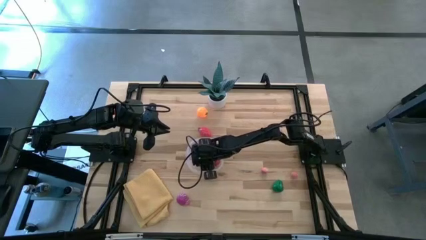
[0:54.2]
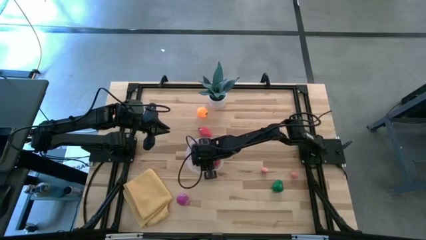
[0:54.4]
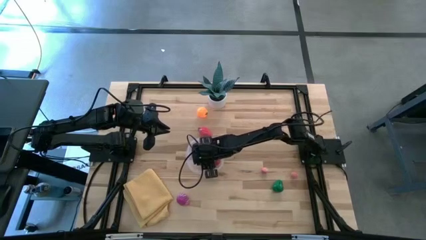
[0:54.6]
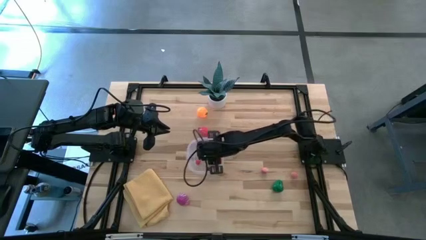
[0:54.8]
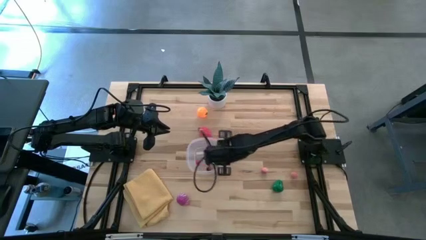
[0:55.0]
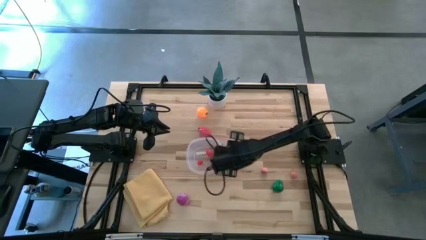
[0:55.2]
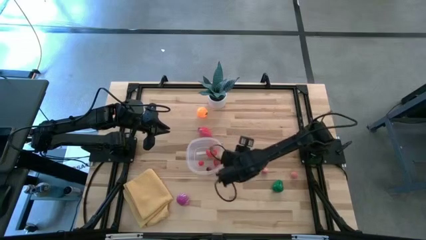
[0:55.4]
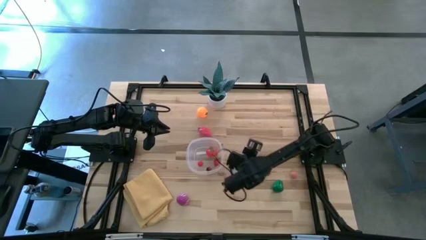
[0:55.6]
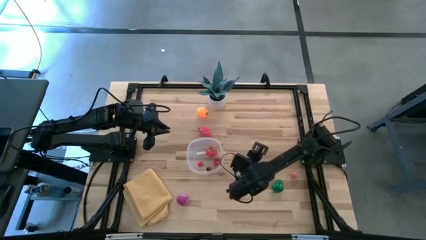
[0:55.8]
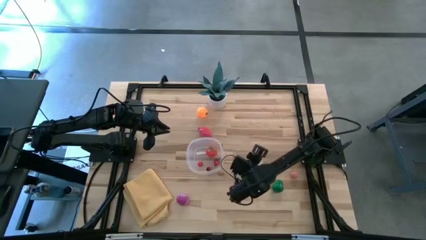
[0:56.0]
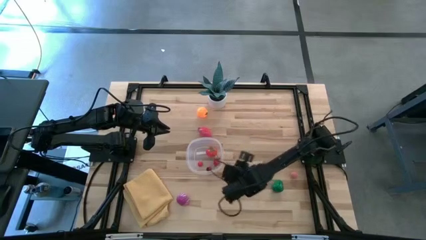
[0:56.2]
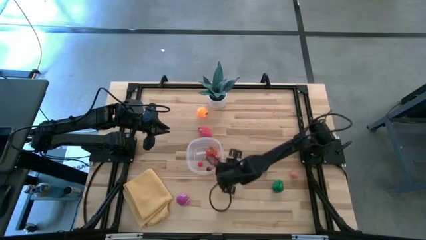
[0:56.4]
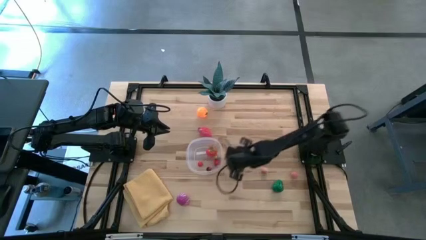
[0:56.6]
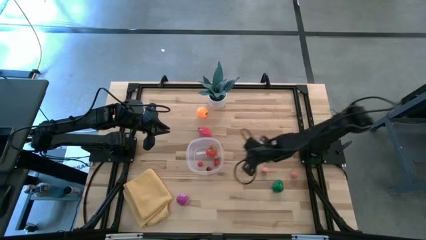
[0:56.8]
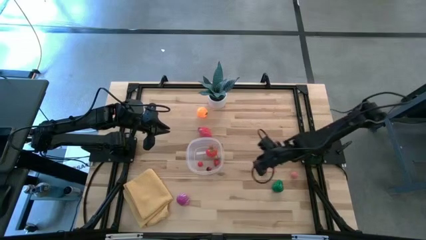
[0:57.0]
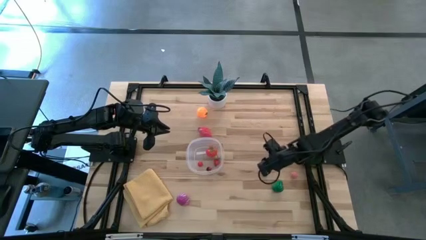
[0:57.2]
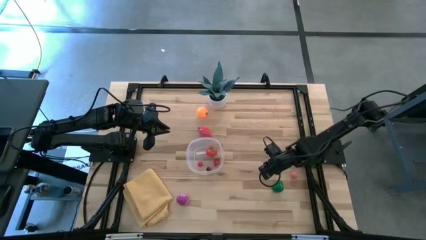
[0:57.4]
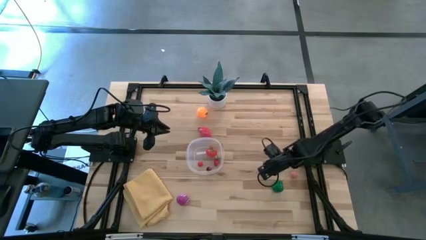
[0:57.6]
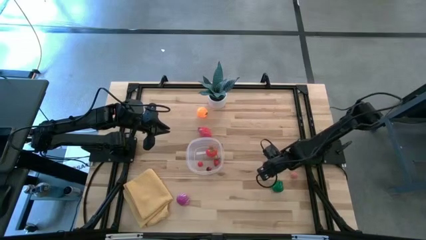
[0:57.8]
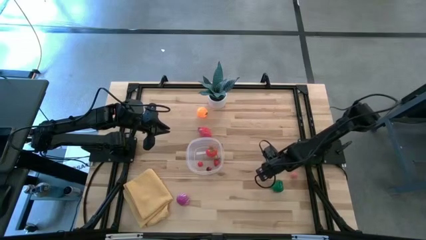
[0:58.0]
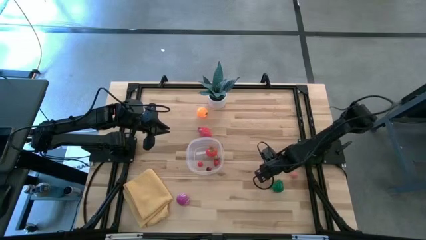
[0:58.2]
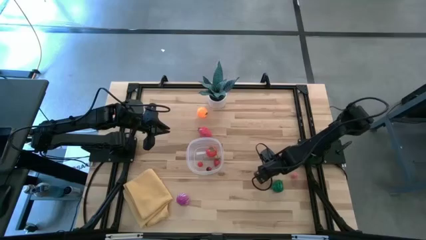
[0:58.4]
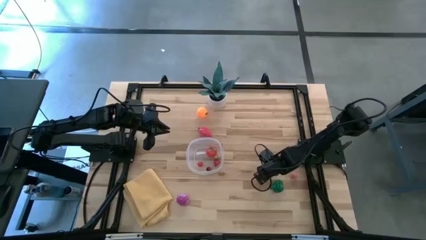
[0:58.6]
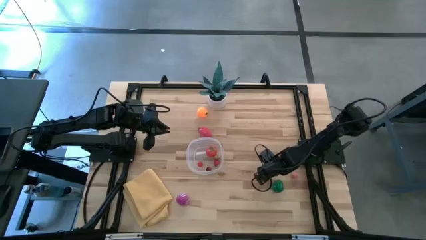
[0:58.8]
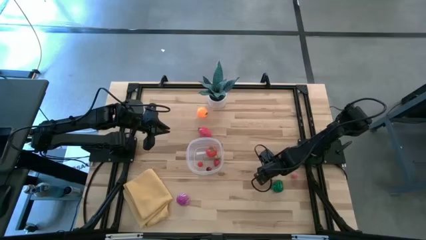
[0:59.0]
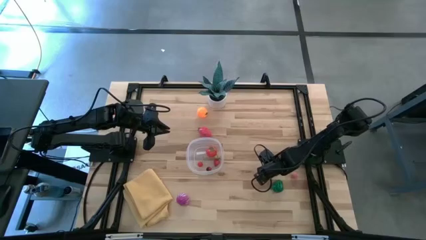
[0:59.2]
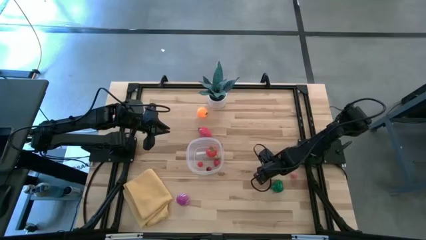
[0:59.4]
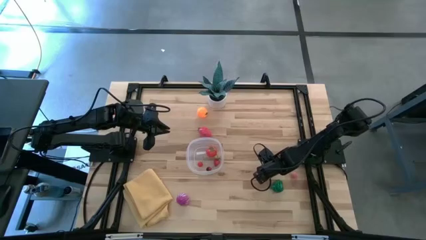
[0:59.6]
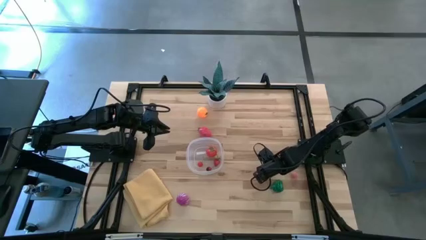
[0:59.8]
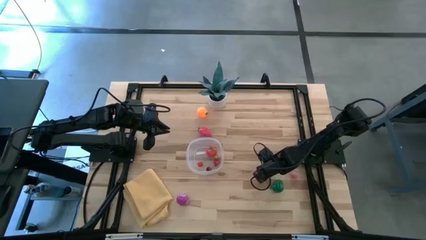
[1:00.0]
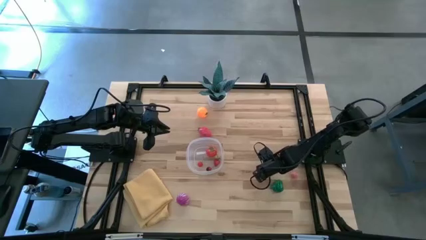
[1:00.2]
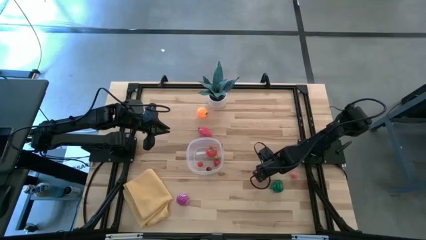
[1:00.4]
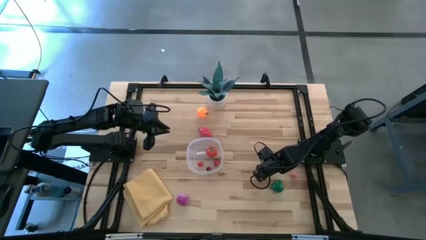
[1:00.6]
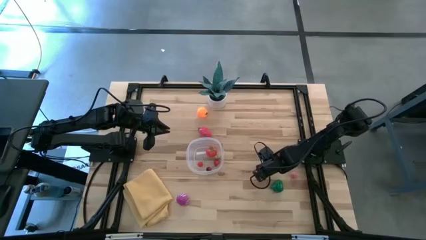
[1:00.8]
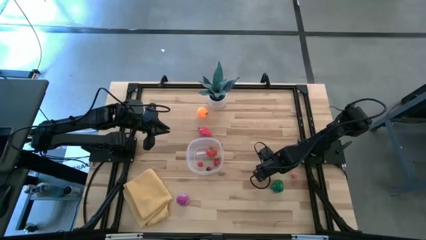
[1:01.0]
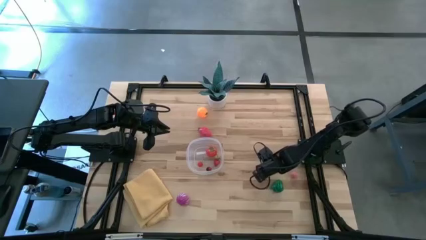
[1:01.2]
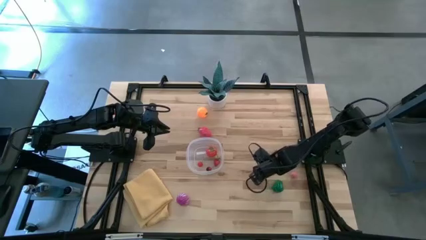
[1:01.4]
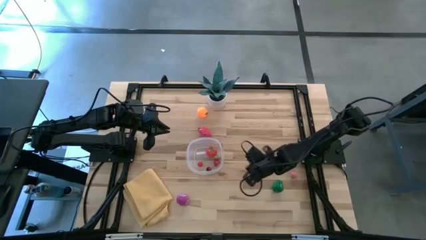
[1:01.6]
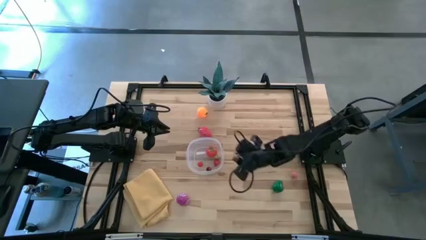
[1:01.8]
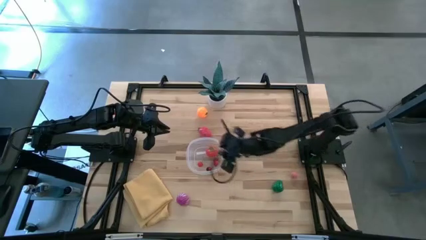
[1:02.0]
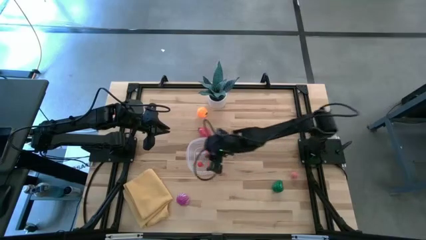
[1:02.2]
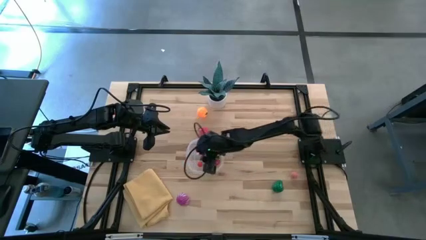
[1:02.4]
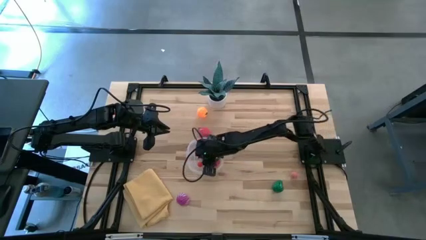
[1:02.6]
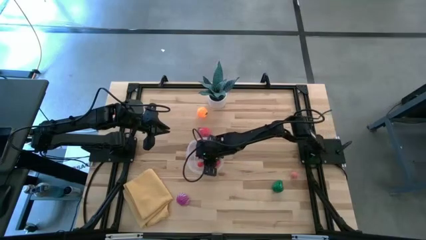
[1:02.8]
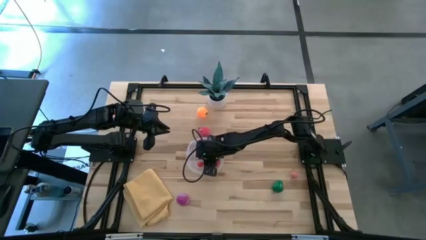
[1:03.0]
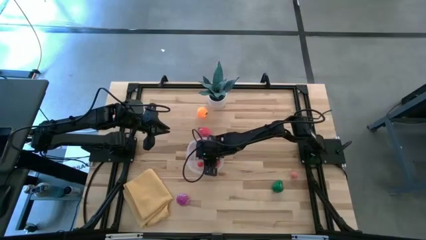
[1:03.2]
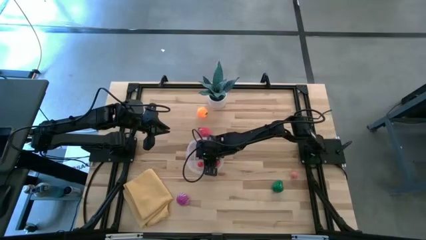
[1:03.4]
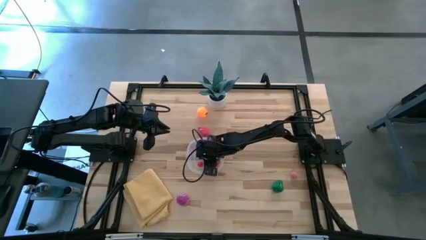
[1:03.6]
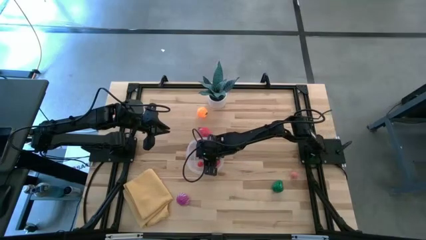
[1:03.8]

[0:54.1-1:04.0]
Task: Pick and placing Produce into tupperware
Put the pink peach into the transparent bin

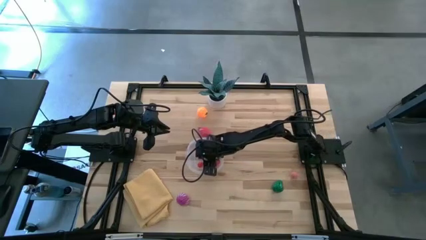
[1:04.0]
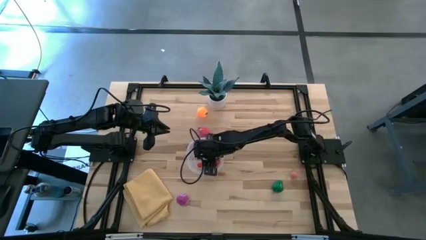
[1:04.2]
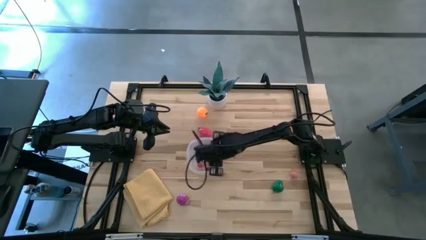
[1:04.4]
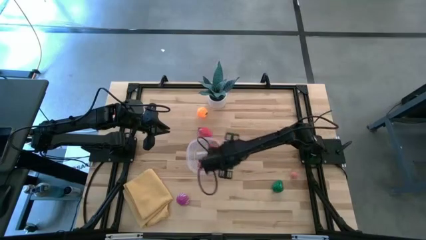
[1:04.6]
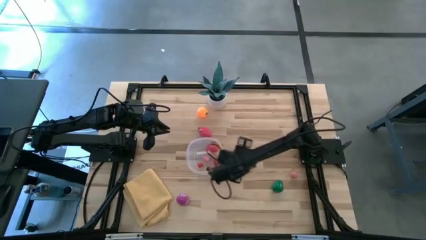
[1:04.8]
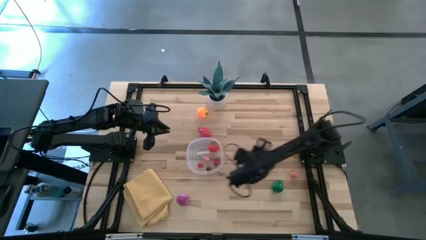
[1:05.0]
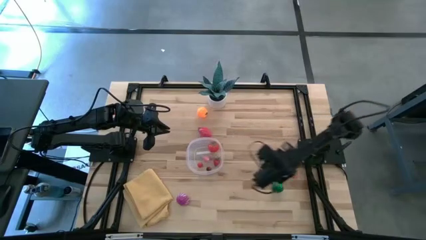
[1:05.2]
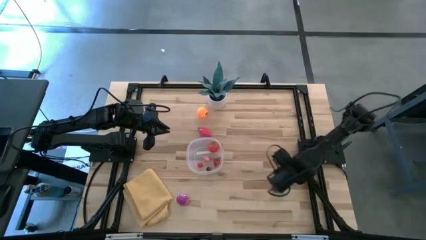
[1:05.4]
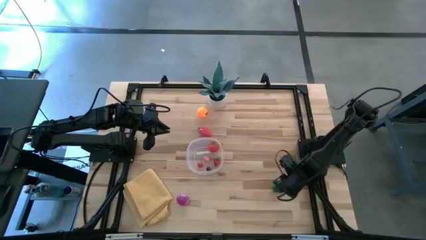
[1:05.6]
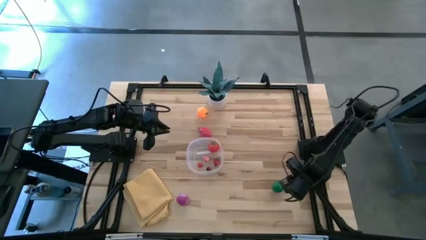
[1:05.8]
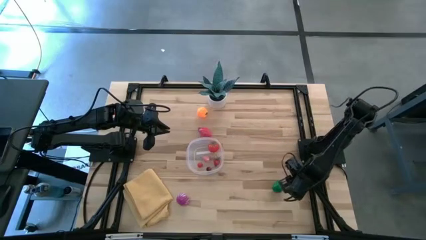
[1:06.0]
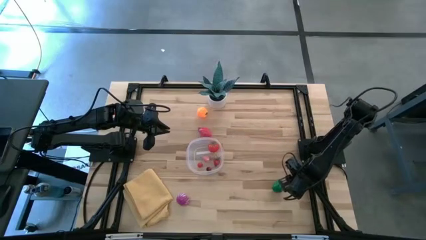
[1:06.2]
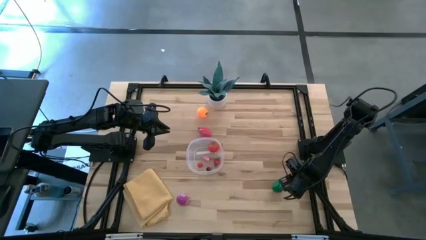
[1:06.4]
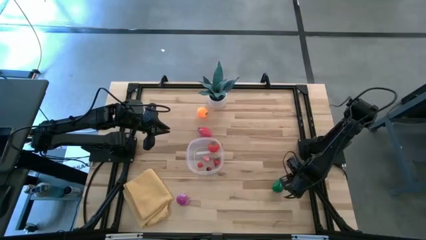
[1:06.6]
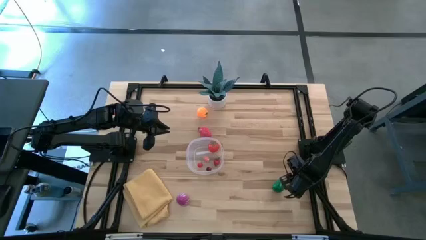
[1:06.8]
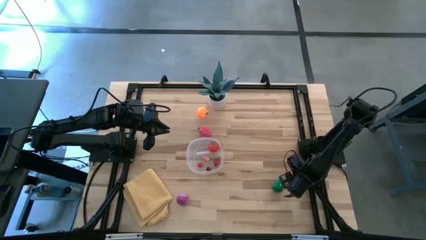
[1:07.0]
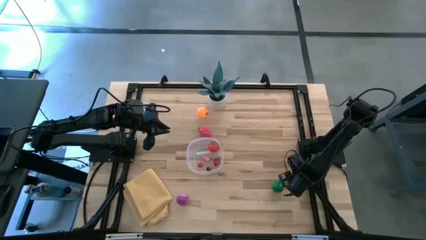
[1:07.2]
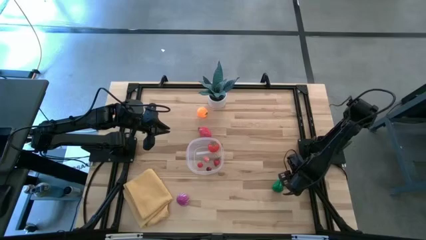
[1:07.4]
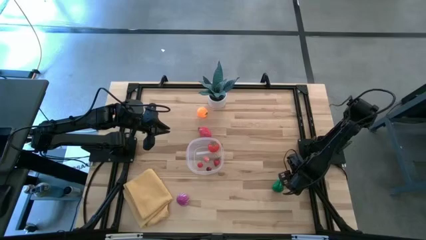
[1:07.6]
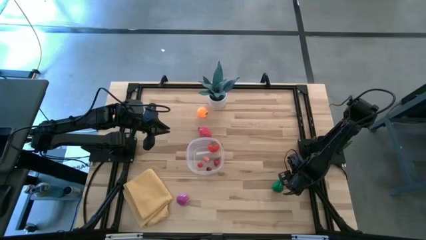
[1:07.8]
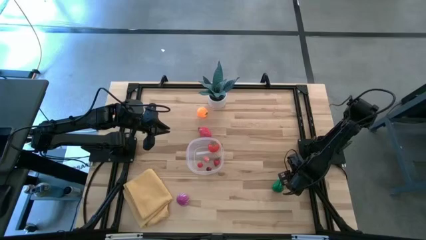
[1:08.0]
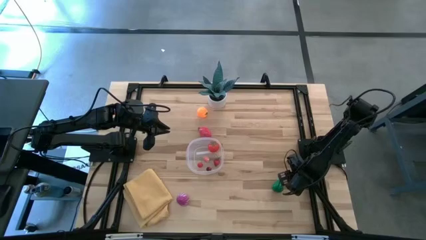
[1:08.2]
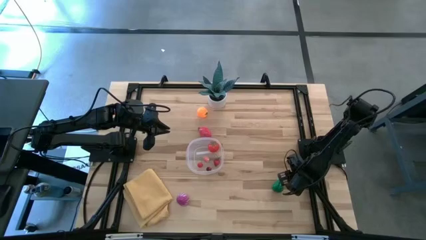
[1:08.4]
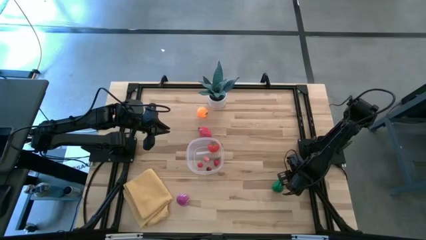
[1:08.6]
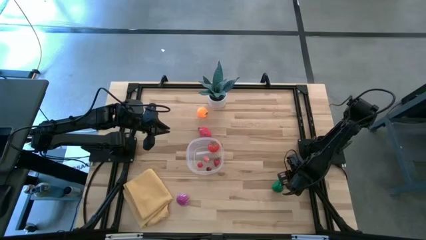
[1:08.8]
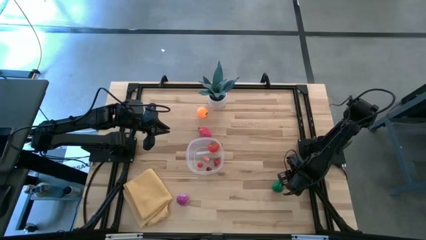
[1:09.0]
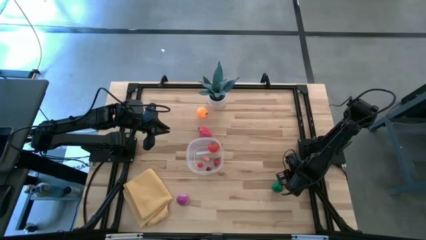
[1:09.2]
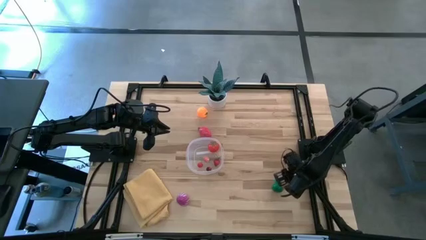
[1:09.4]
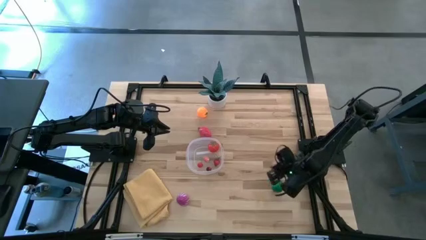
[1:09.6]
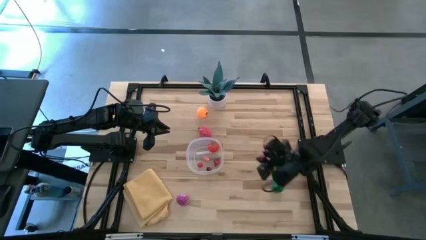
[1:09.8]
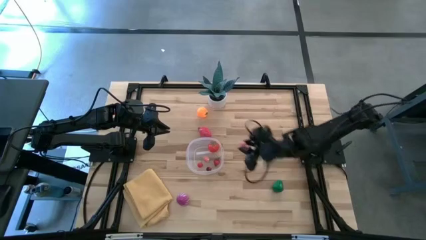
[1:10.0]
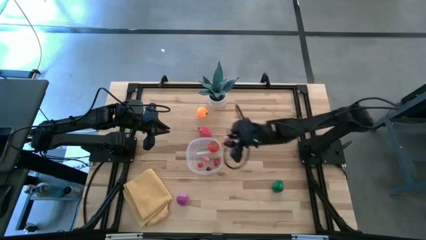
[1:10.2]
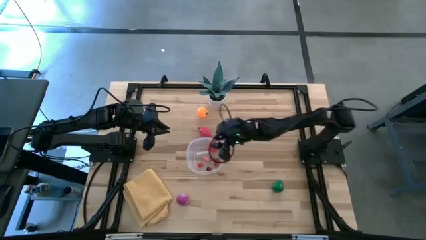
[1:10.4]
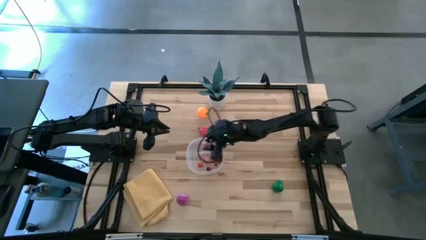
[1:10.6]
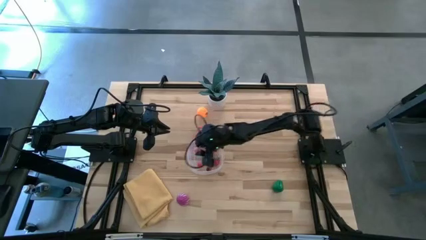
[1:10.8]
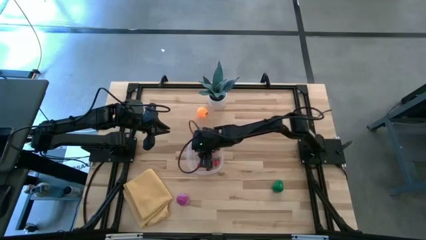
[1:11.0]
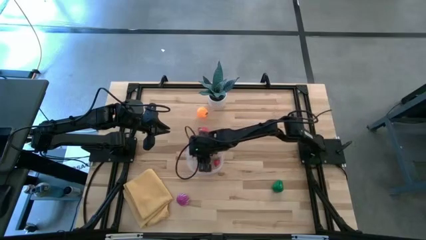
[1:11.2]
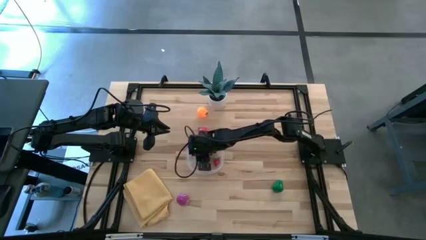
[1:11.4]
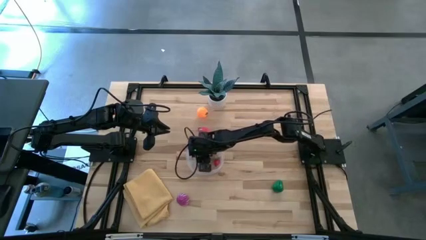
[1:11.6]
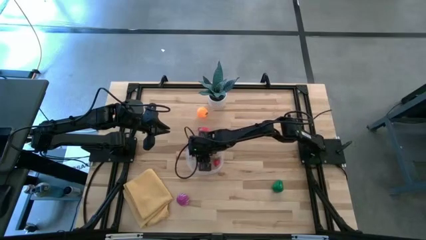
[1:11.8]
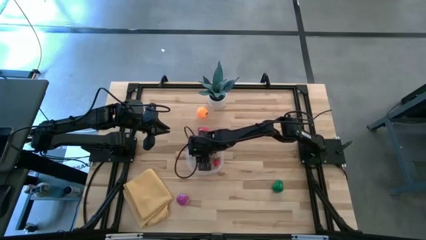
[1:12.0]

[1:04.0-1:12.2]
Put the pink peach into the transparent bin
